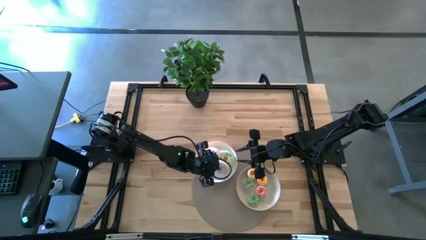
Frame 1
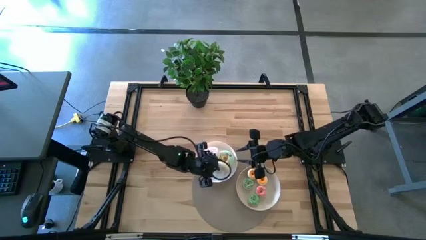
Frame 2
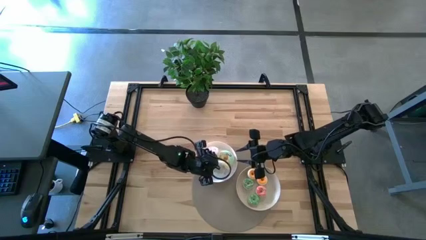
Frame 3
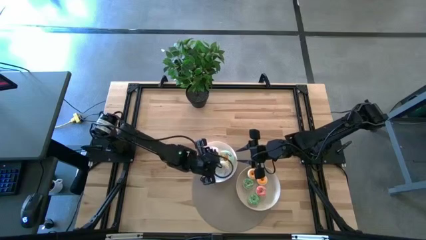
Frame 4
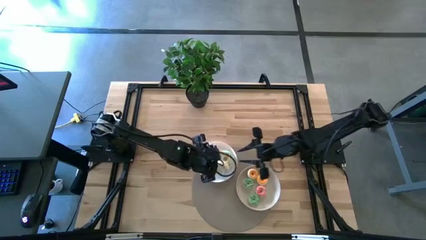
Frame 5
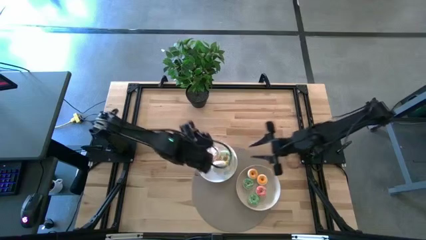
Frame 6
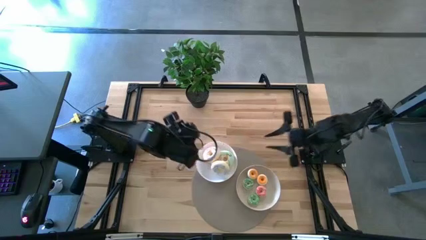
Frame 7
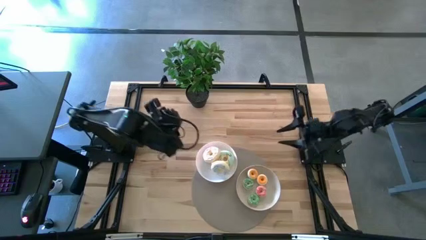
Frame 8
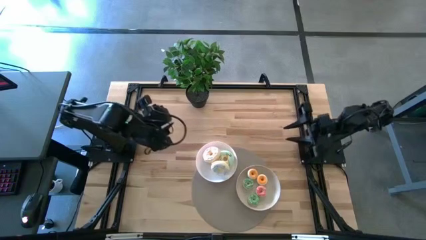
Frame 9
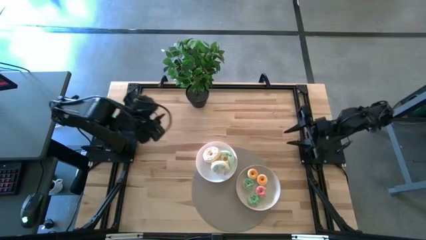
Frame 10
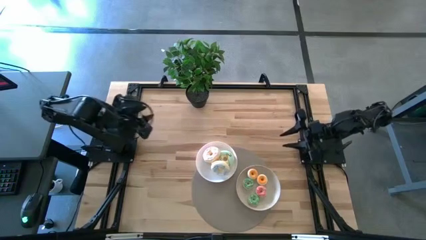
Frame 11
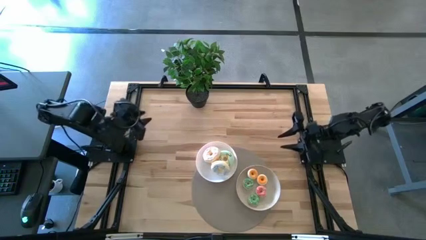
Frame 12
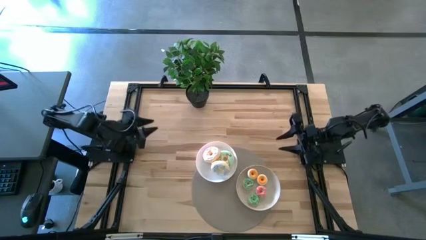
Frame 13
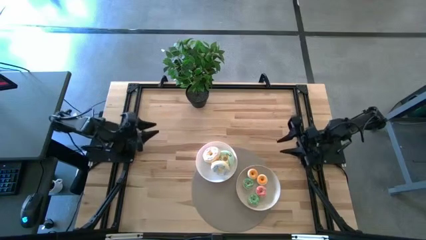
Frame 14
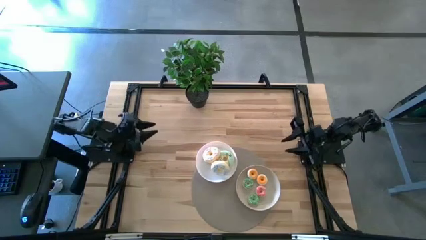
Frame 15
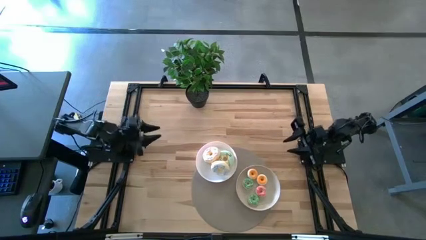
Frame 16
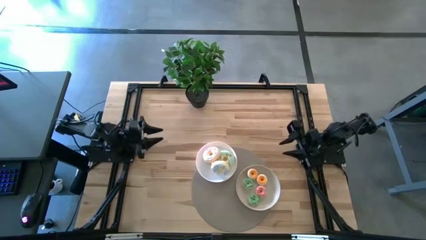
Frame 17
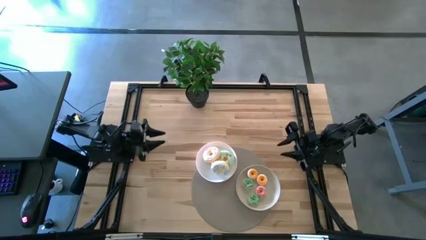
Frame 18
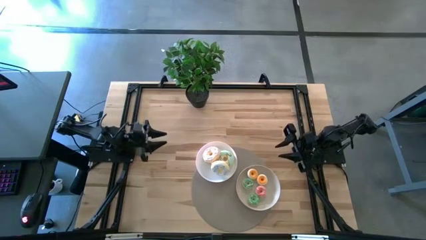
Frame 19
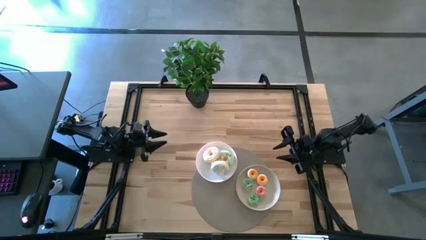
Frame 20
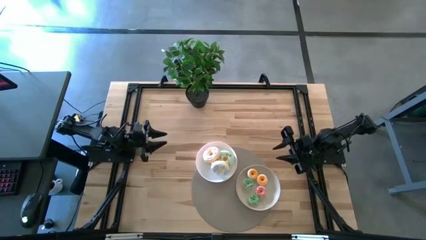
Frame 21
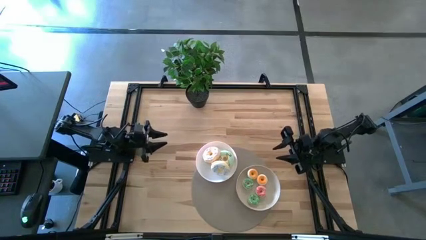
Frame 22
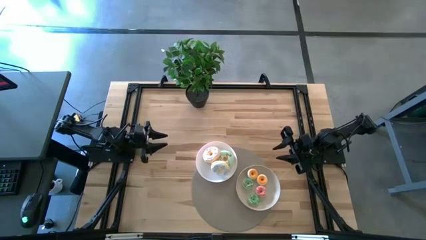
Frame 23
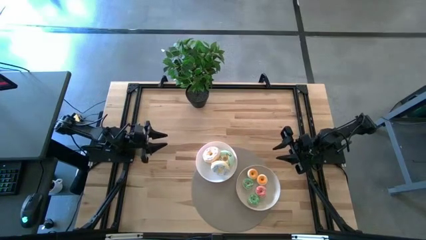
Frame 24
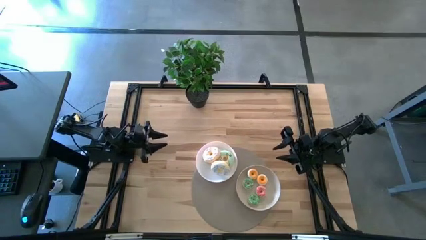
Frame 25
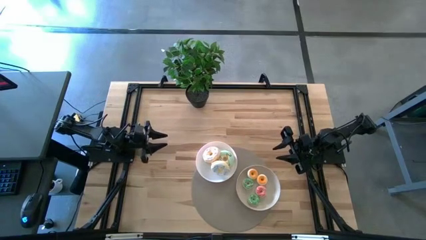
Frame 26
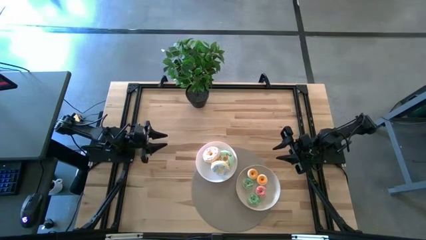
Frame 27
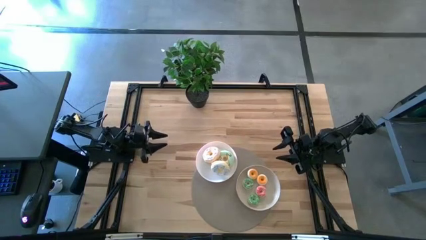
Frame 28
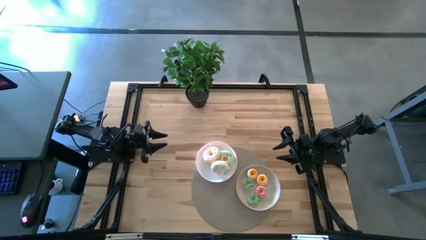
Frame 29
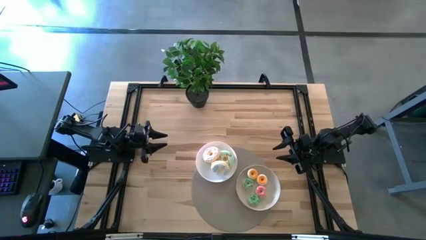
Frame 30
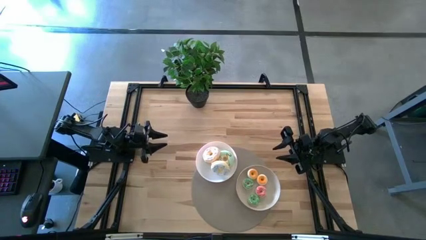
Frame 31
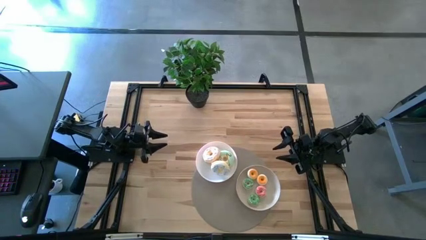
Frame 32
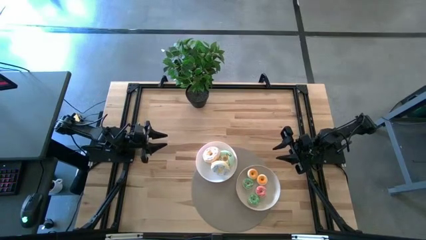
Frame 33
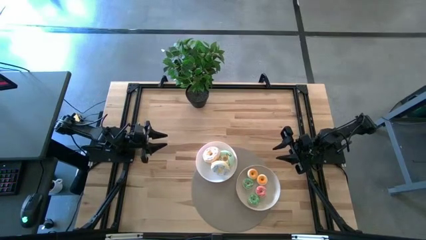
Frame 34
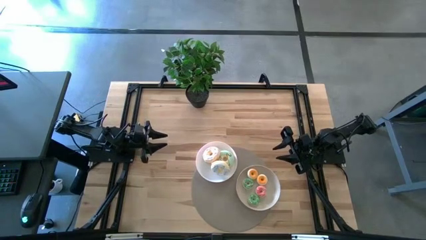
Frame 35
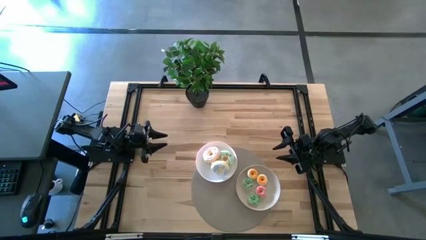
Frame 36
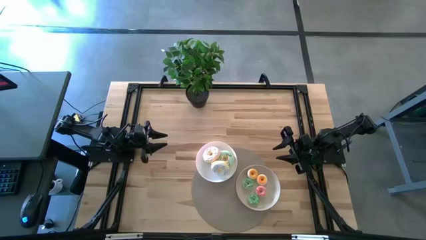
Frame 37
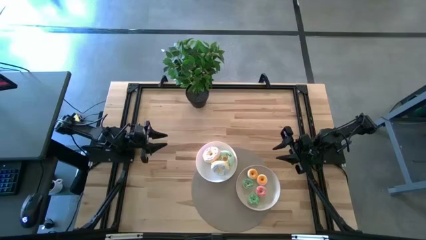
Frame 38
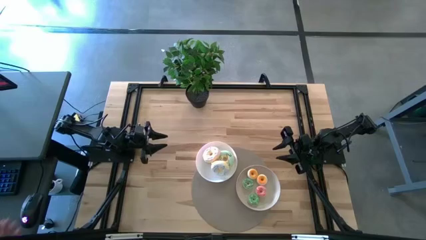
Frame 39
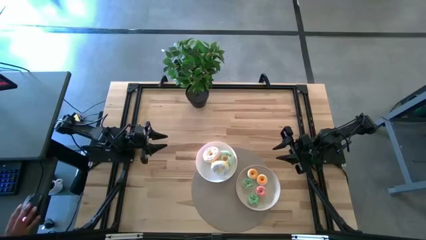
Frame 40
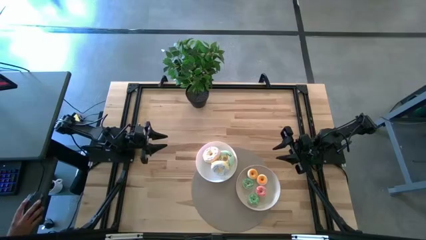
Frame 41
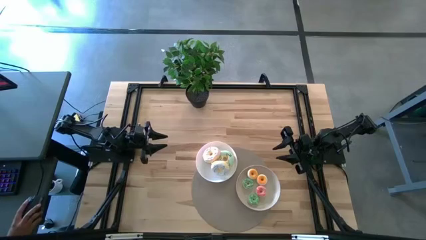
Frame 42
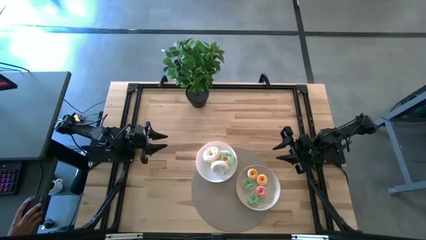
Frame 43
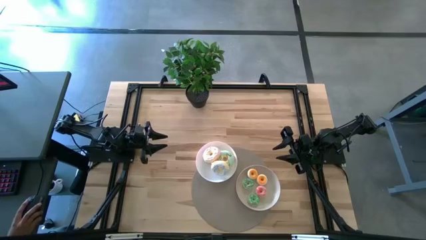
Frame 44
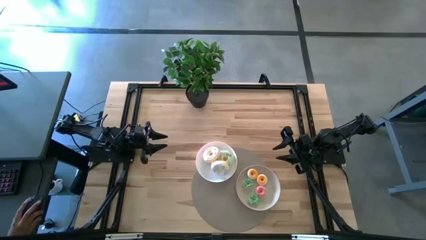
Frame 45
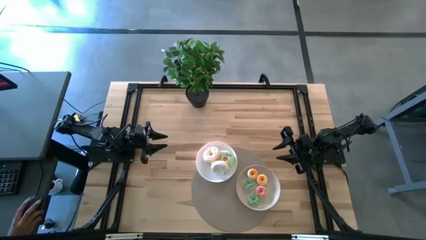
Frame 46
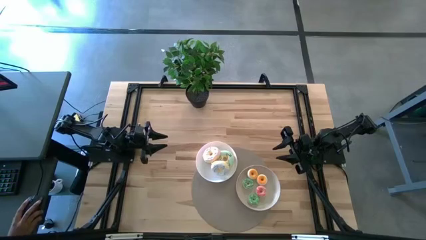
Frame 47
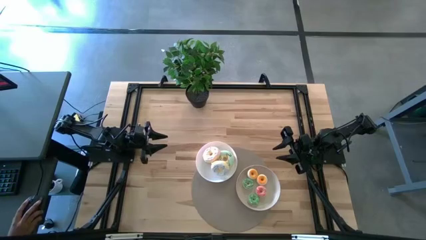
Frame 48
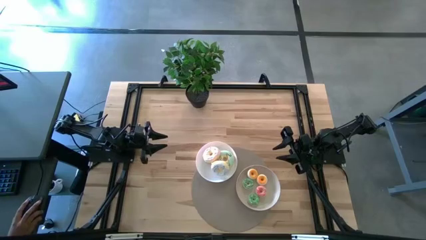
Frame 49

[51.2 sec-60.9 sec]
Task: Pick & Place donuts
Return to Home Position

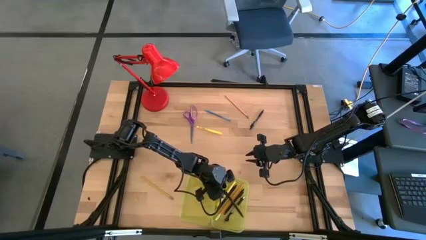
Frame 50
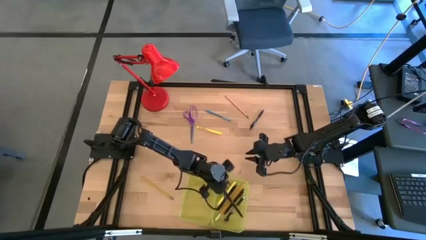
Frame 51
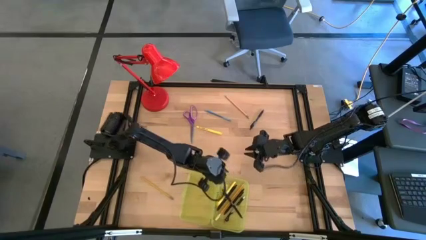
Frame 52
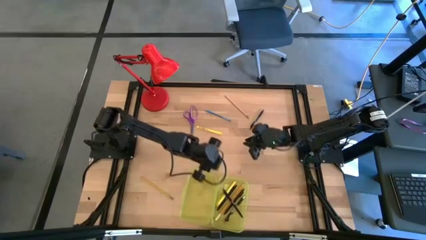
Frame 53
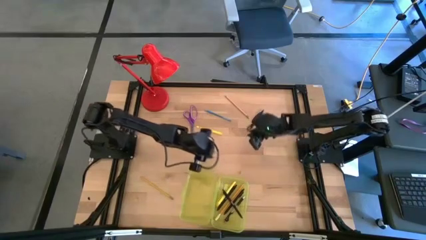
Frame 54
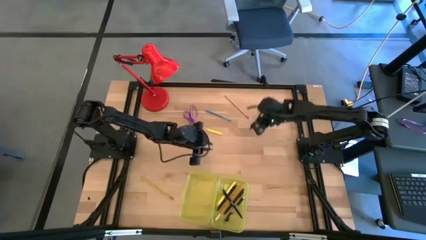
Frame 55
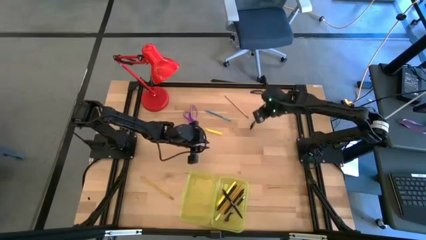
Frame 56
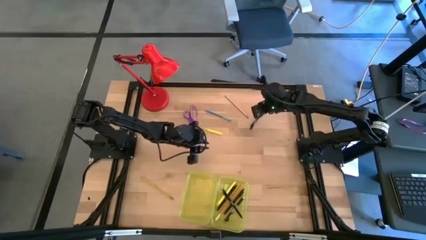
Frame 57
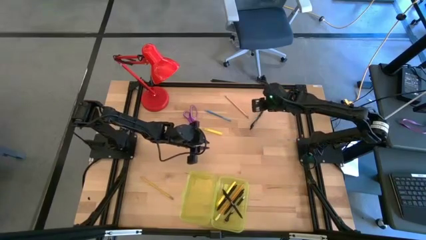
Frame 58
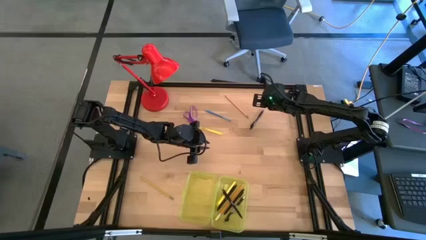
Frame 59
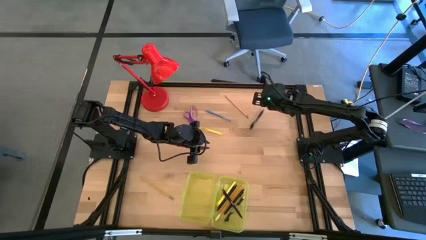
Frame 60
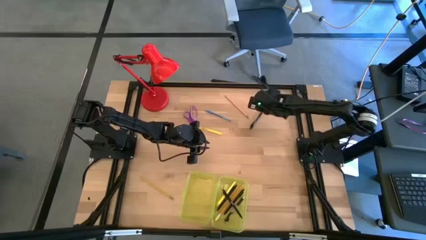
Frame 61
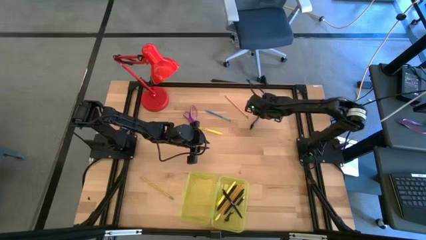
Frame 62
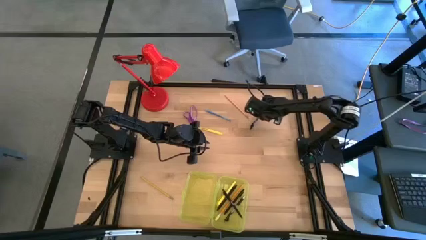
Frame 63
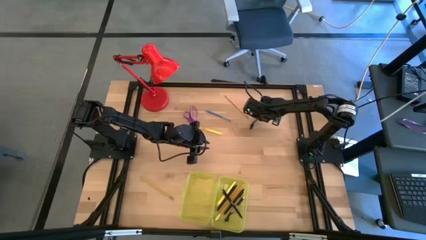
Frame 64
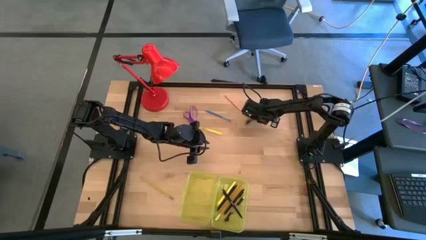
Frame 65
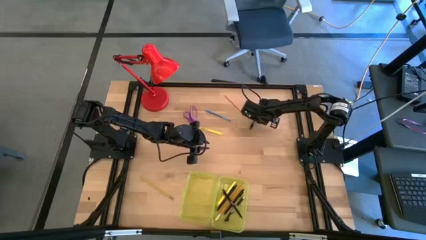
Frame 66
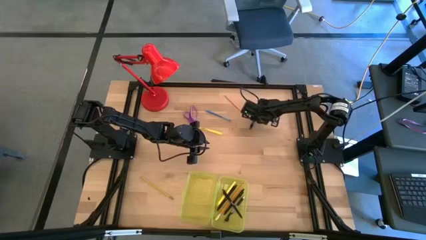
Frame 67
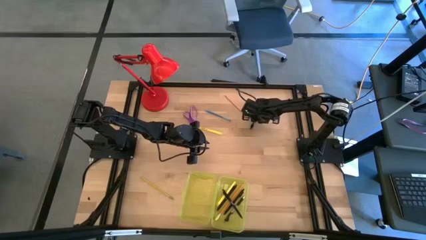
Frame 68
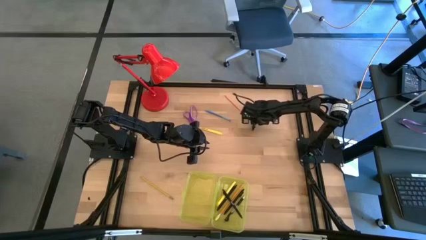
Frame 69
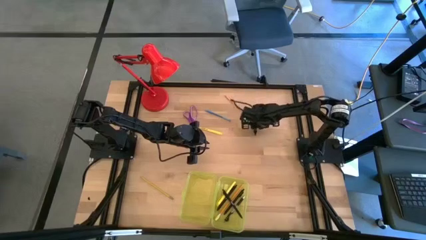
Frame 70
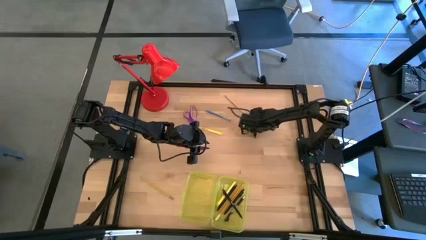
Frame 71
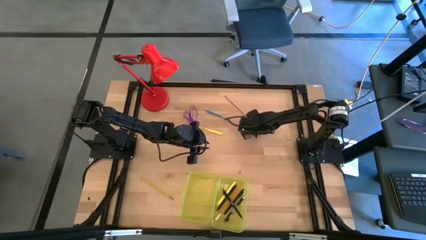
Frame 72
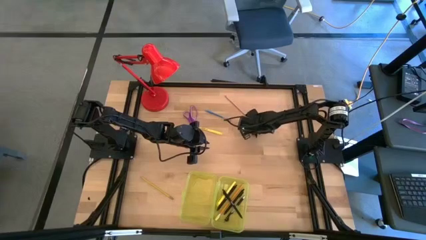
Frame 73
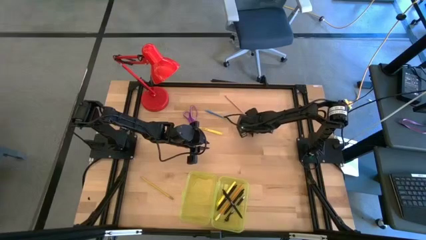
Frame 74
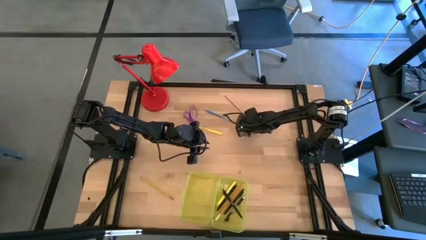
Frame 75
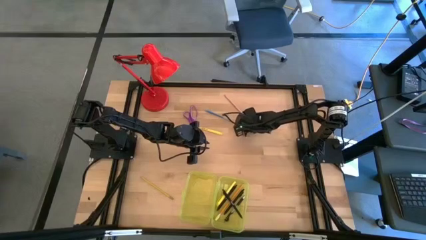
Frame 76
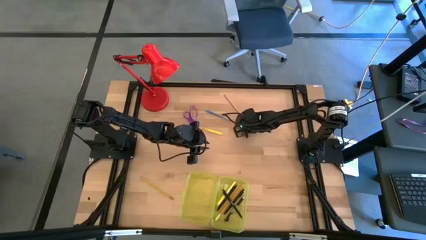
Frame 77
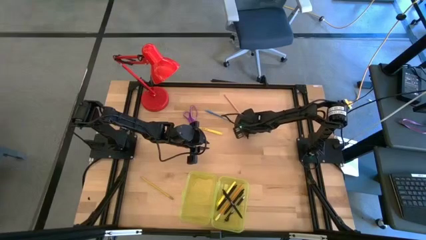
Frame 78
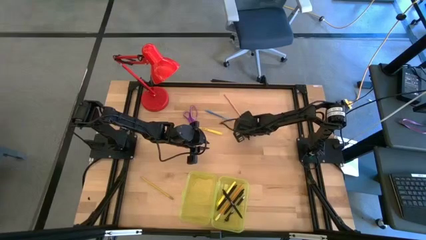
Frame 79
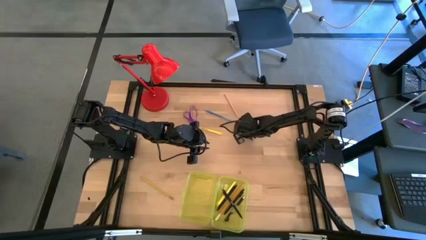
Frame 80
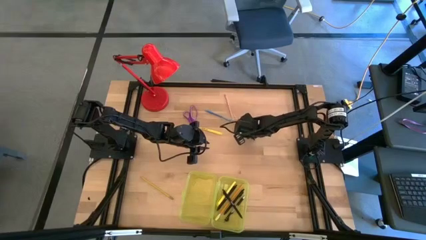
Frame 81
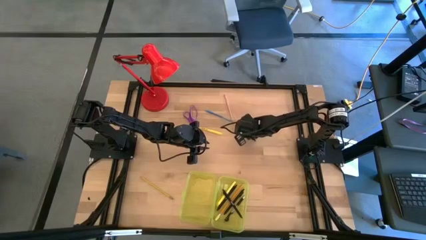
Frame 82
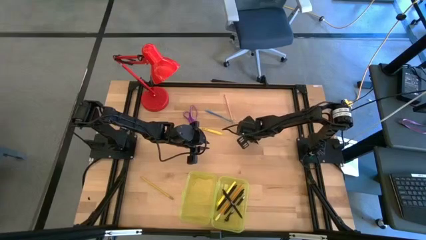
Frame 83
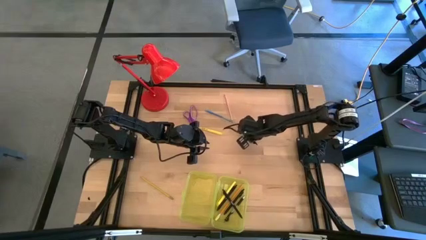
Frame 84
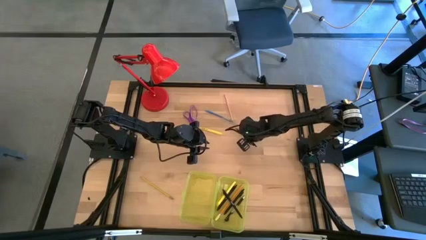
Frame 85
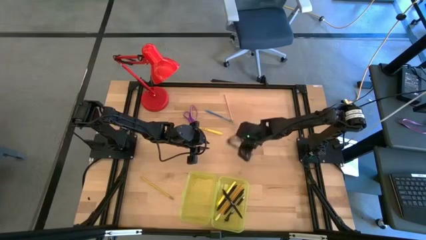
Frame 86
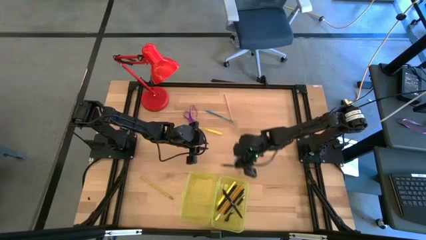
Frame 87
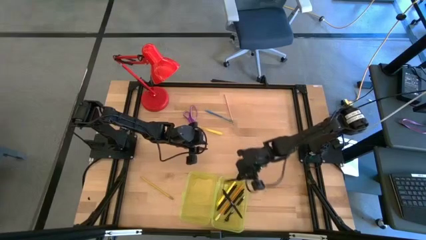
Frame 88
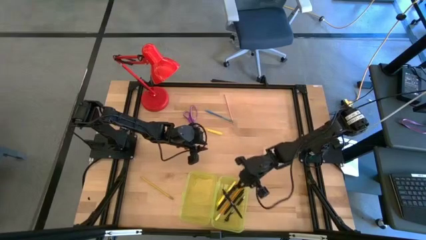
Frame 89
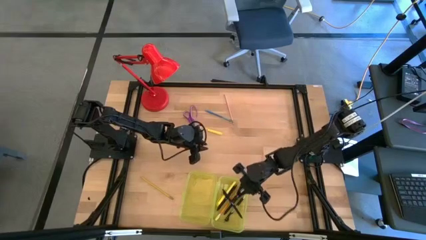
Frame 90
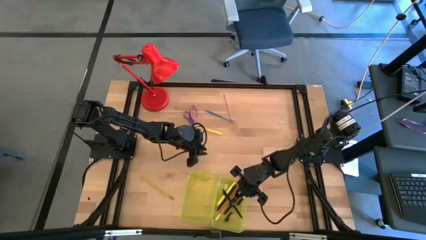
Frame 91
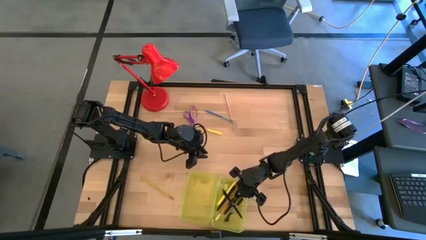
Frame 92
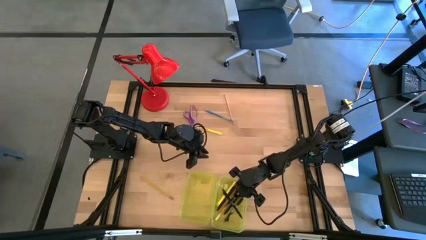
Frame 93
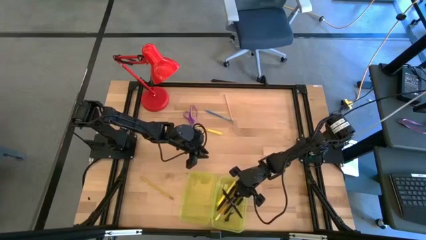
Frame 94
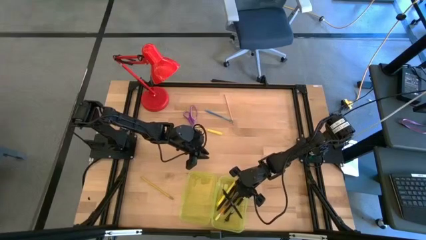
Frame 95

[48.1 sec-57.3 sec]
Task: Pick & place school supplies into a supply box
Put the black pen into the yellow supply box
